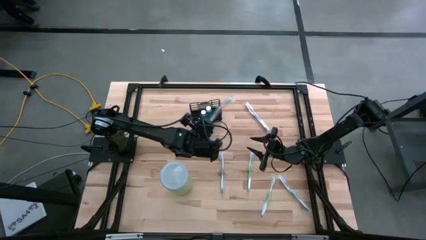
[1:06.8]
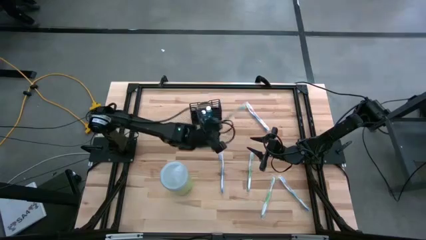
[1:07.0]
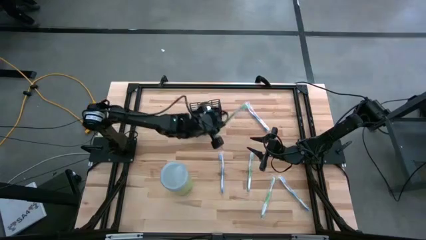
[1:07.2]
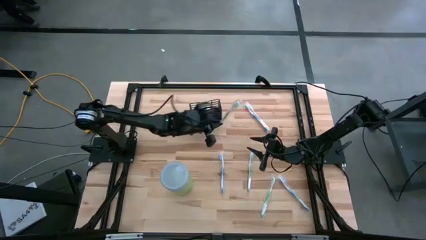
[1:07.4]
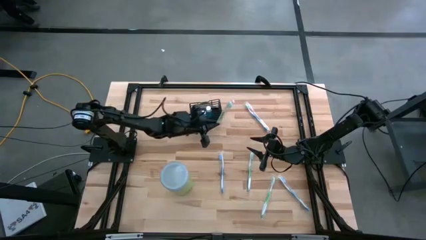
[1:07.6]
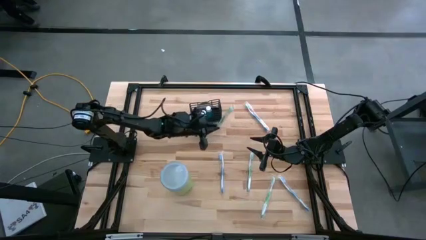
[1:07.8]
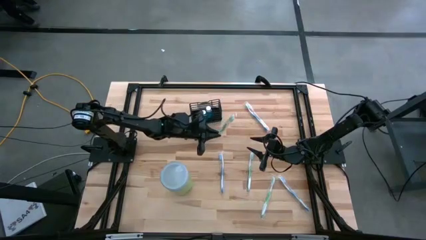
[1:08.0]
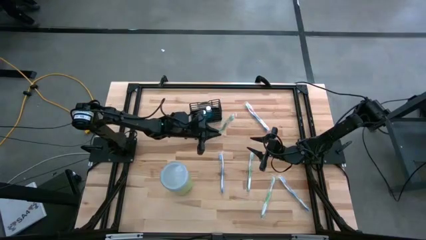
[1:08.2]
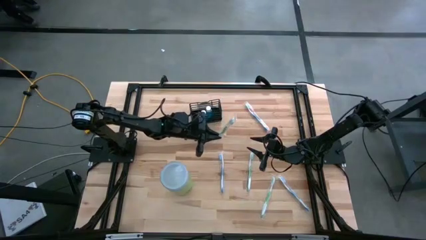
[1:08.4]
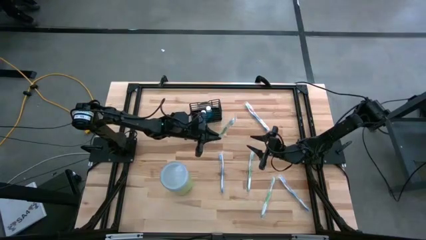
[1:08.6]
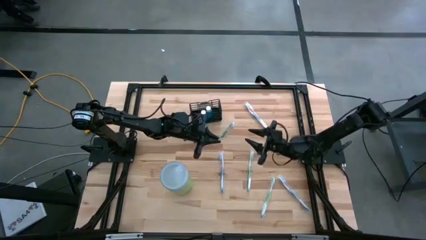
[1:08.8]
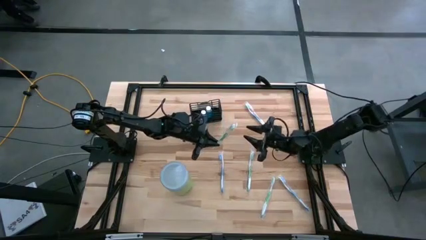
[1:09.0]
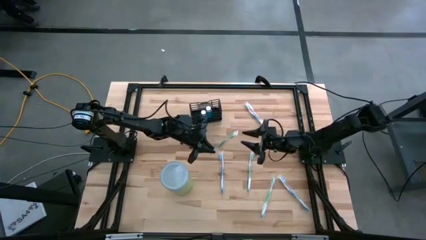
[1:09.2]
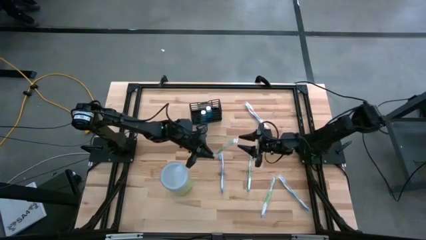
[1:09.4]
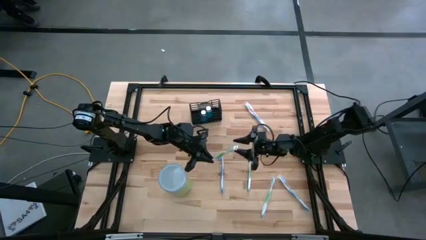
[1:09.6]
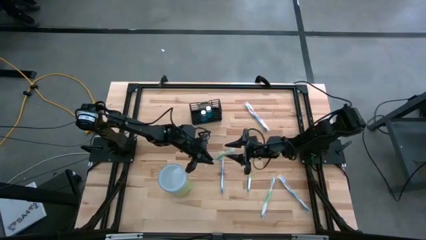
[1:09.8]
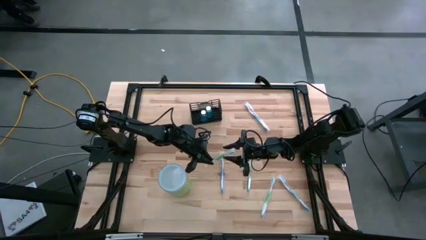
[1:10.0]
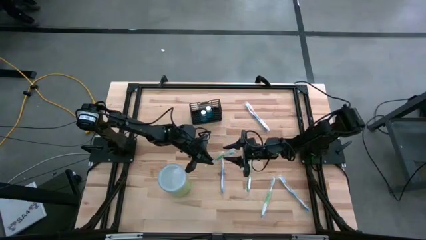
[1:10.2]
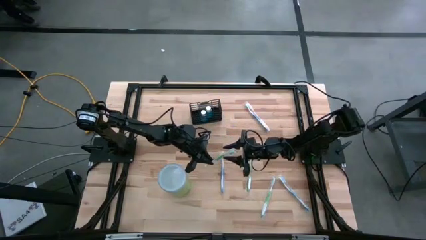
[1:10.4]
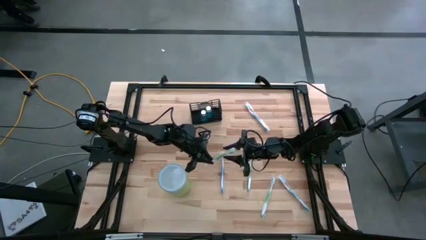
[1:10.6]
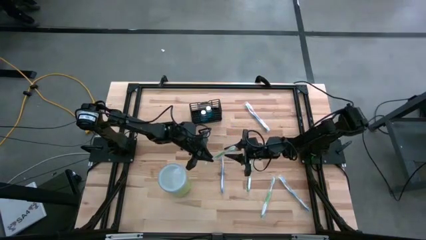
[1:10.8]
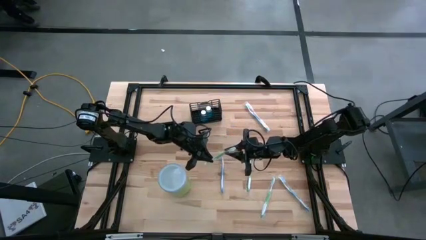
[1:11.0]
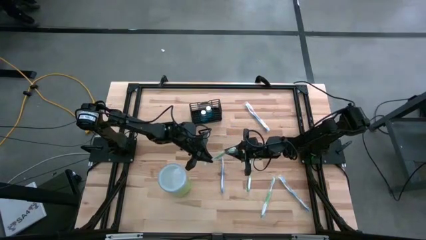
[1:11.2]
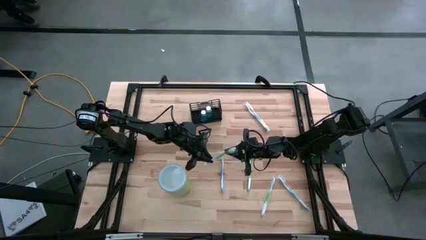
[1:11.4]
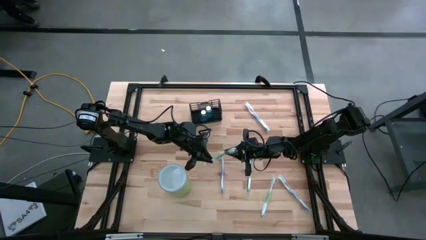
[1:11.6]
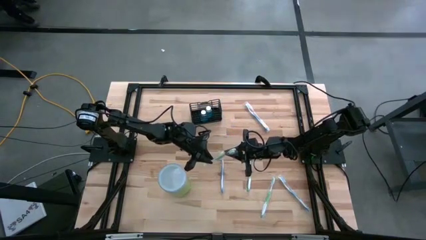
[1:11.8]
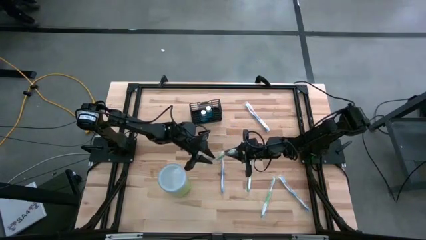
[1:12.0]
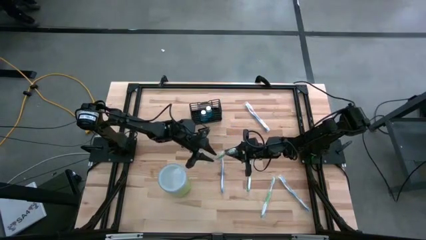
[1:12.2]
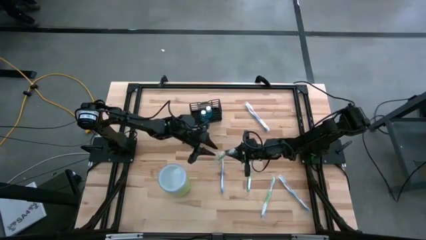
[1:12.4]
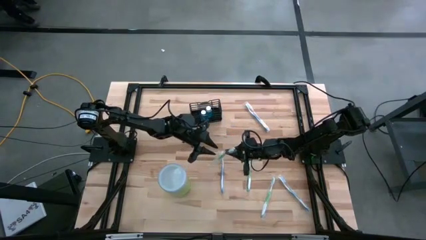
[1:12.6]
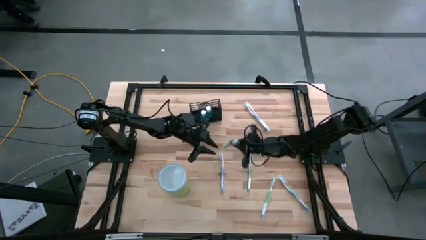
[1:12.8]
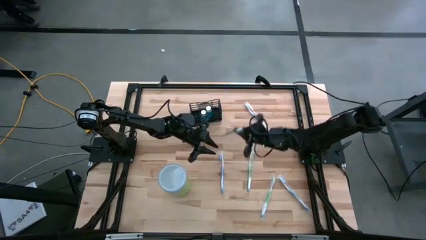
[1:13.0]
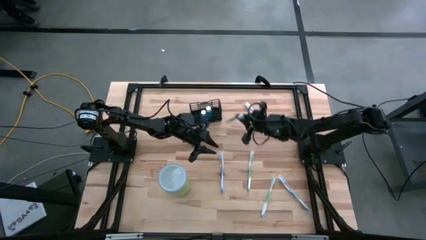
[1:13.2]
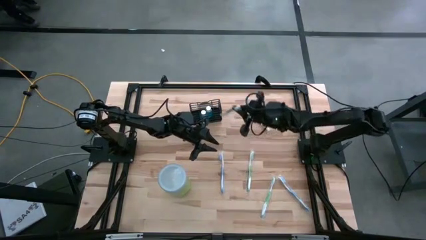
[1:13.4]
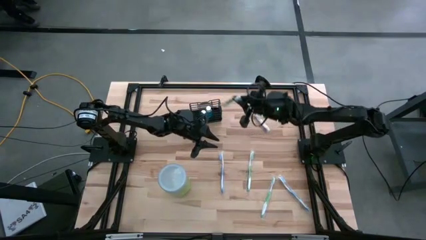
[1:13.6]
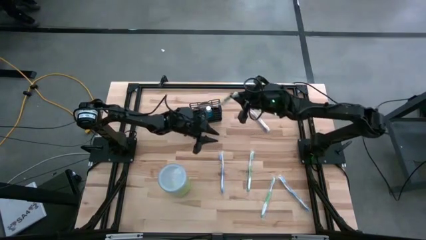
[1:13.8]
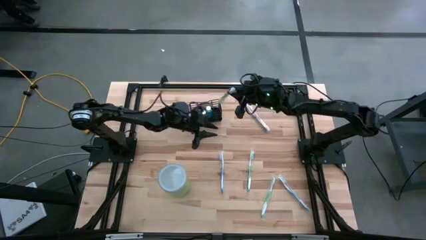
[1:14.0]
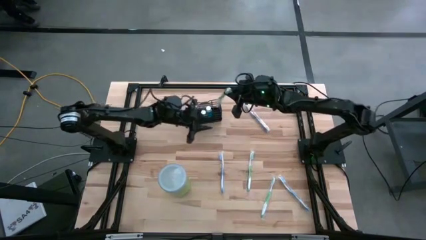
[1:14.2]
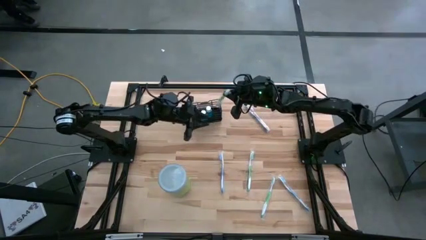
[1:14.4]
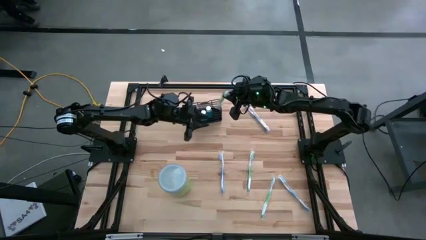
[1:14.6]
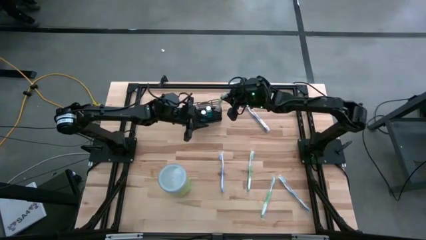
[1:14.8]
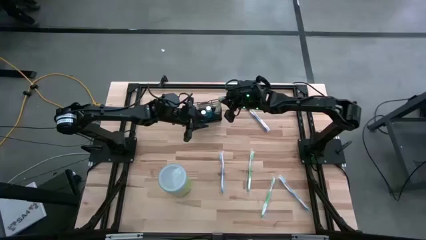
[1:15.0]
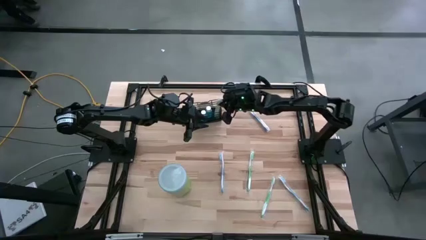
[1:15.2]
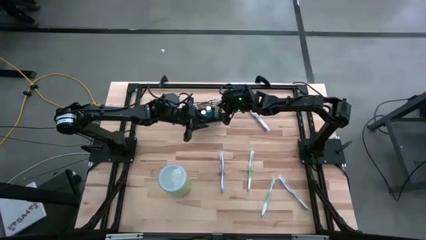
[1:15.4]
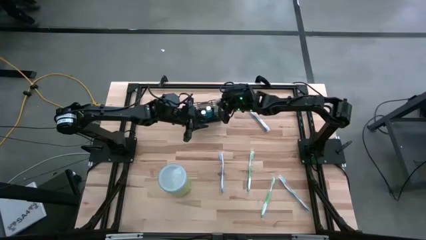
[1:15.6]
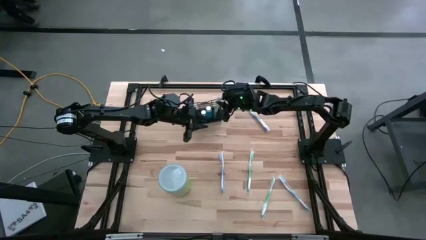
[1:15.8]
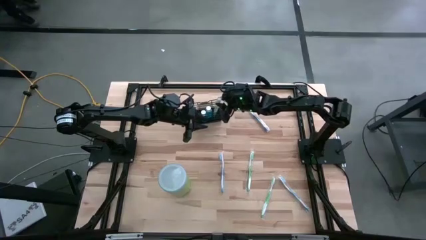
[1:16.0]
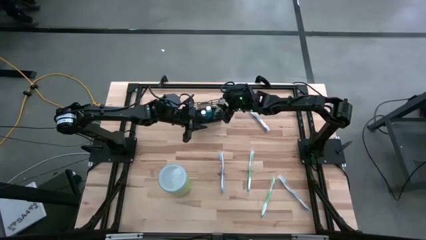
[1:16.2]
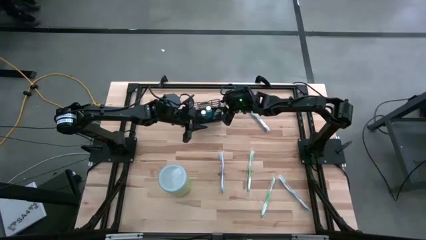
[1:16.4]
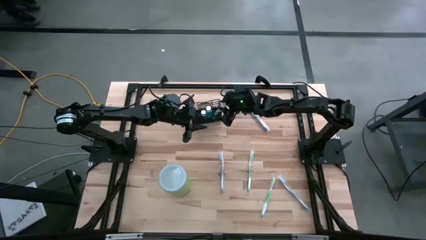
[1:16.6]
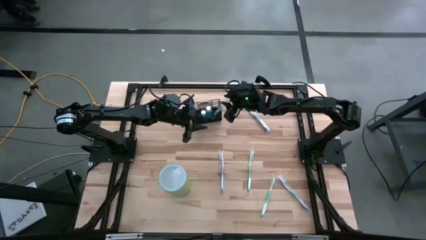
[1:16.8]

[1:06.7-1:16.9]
Task: Pick & Place toothbrushing station
Put the top green toothbrush into the black mesh mesh organizer

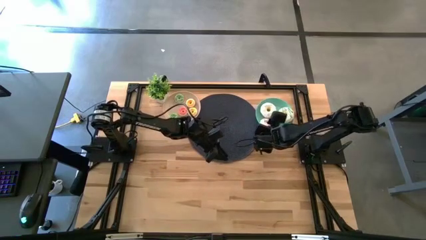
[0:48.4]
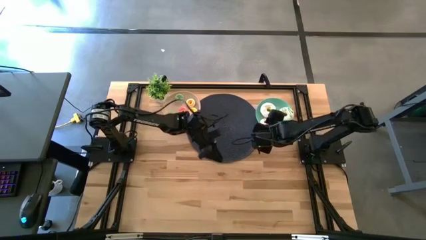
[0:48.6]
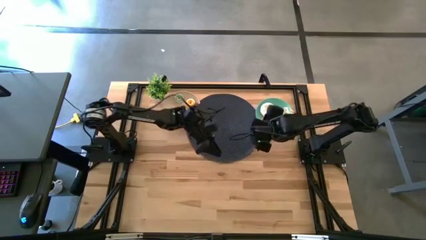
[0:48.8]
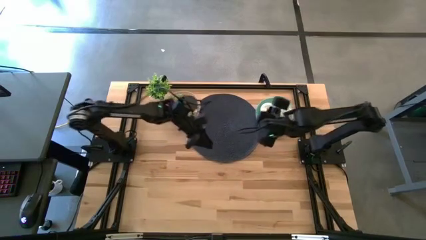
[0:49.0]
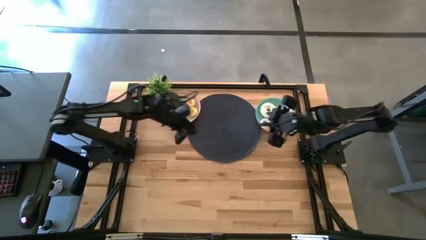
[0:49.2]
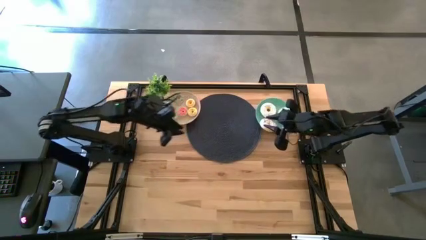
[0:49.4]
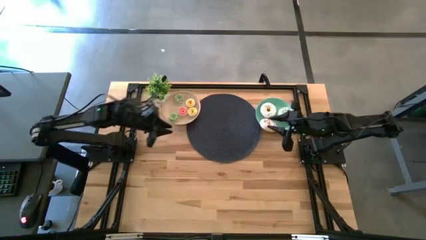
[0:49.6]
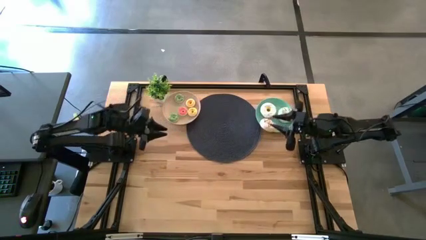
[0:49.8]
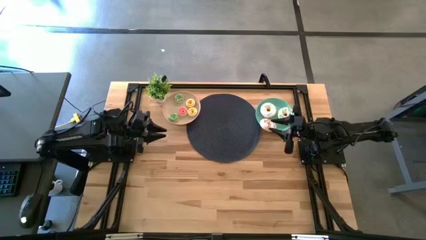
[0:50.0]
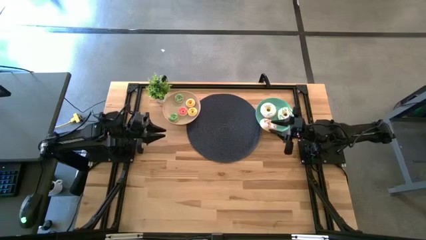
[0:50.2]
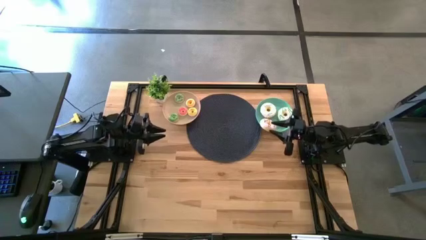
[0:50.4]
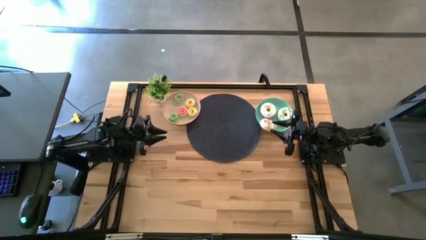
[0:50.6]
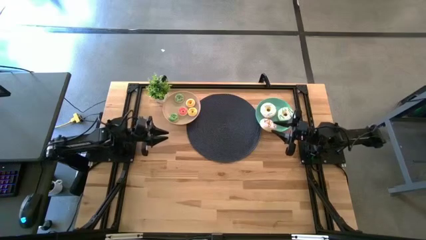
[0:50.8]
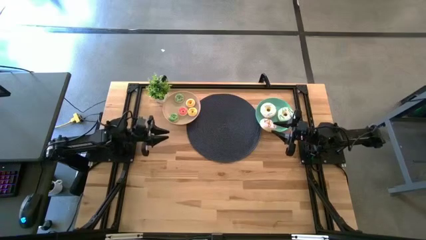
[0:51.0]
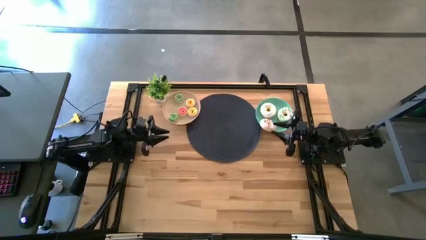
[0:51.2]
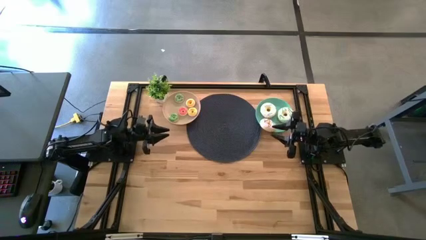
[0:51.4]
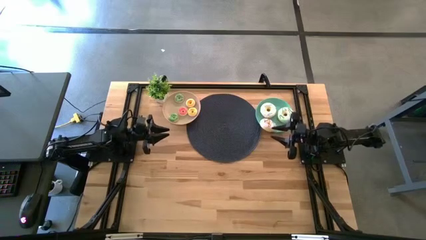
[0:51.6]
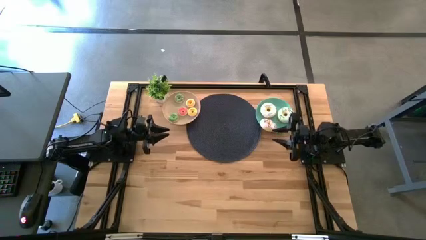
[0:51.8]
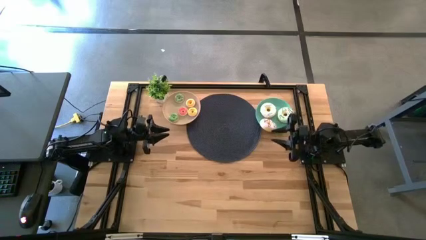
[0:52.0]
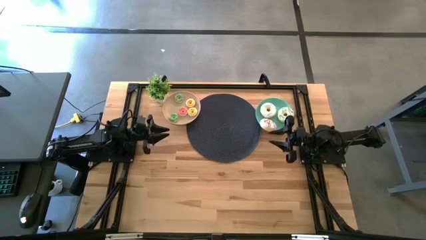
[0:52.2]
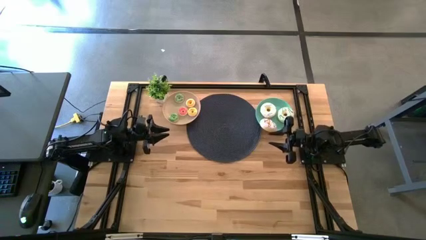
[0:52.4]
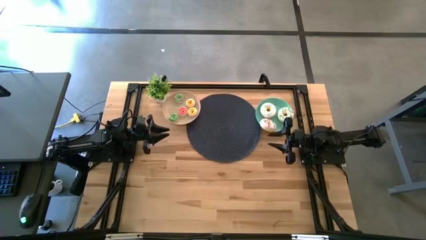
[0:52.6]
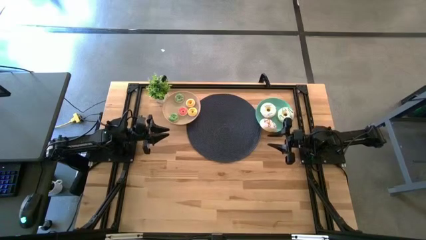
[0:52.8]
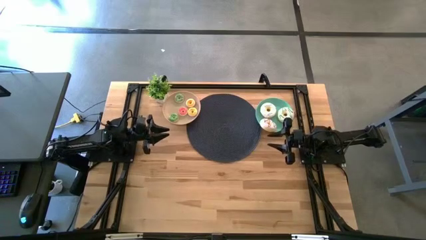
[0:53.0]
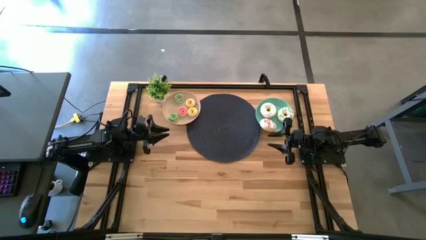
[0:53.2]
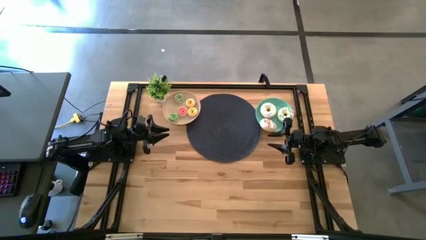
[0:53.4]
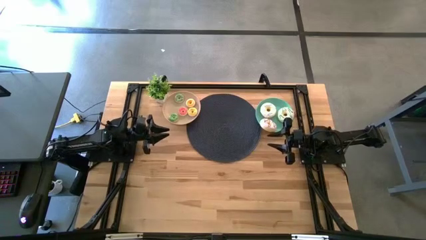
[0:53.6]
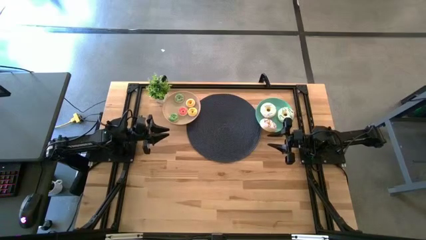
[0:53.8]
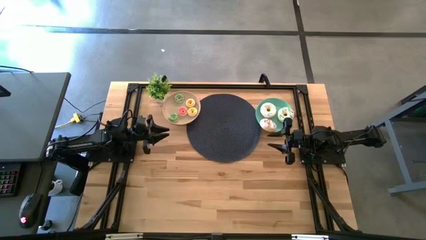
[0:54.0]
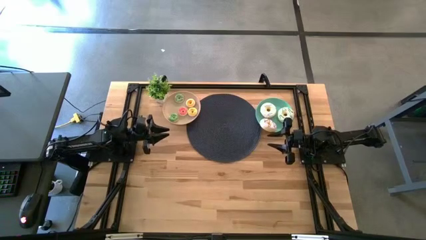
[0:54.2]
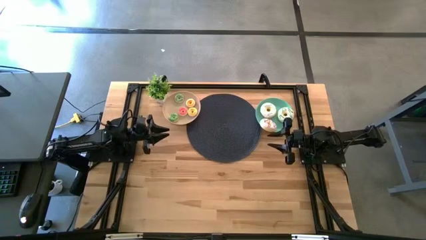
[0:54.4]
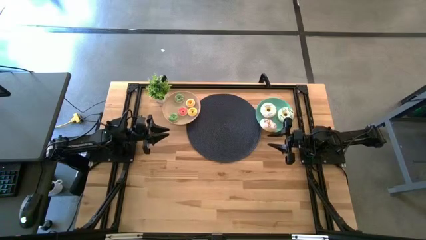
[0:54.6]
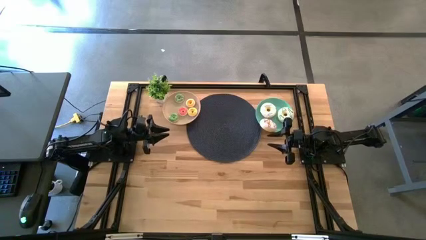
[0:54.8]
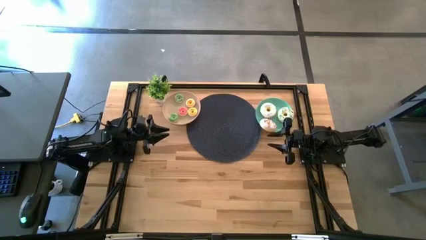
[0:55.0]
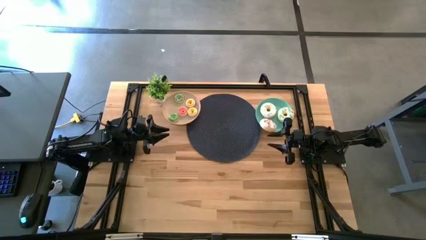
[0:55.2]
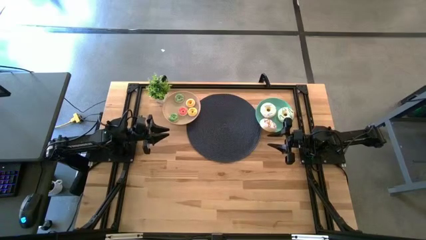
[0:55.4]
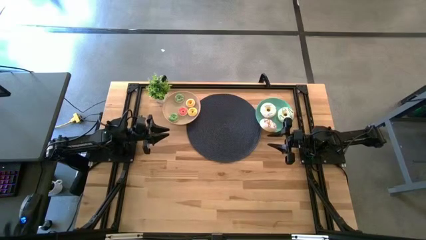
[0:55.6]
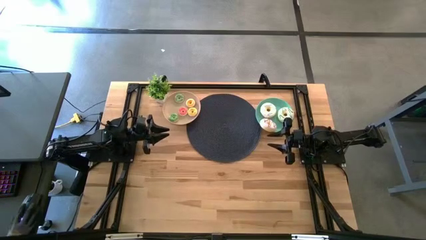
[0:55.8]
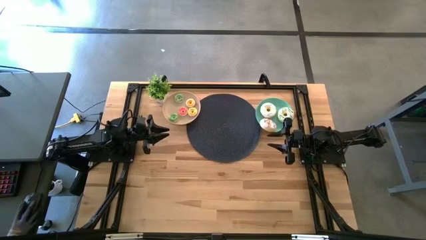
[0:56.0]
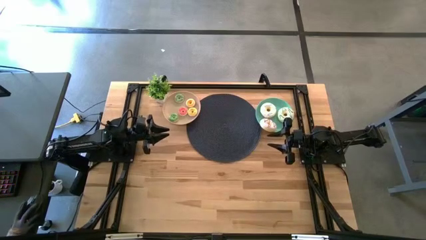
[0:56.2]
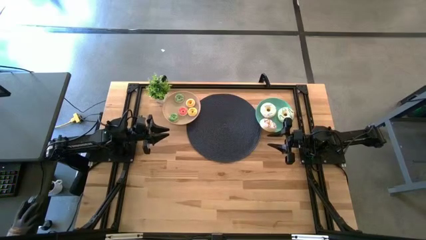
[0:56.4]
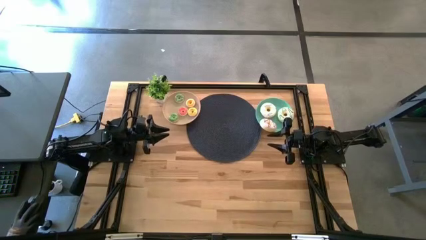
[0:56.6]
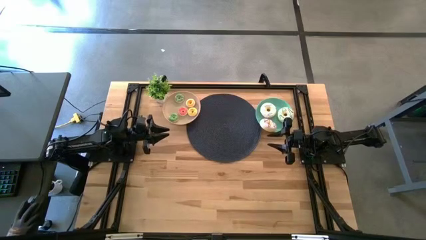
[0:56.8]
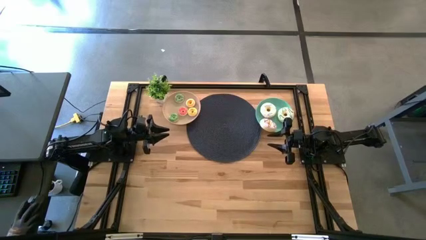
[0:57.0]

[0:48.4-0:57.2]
Task: Pick & Place donuts
Return to Home Position
